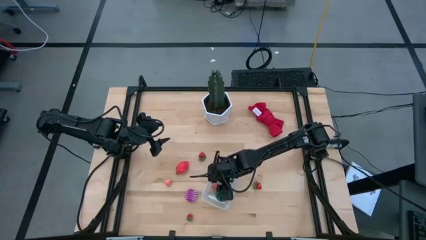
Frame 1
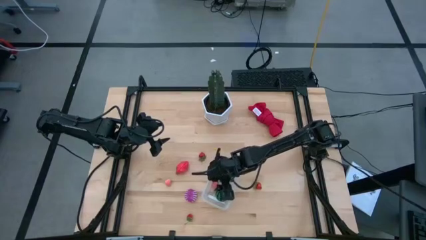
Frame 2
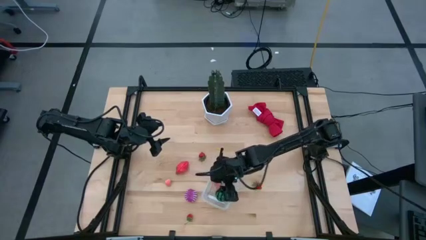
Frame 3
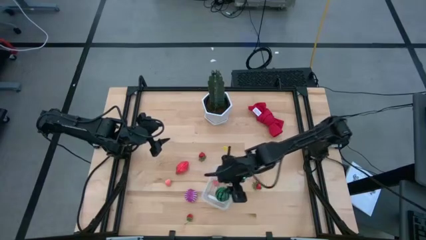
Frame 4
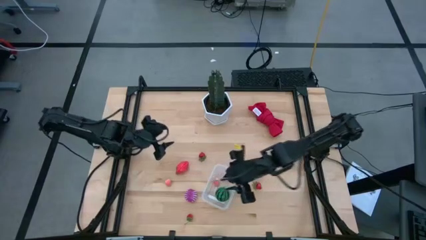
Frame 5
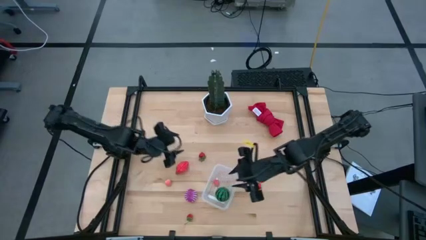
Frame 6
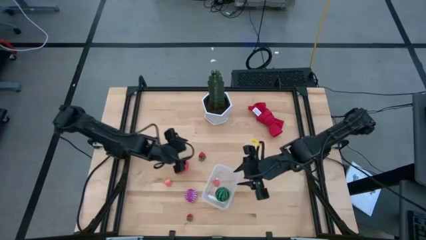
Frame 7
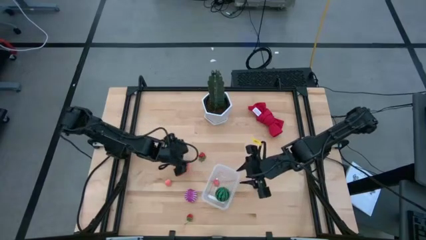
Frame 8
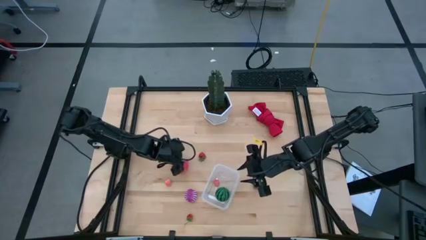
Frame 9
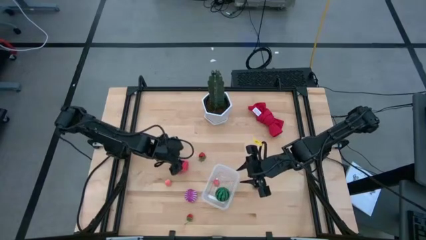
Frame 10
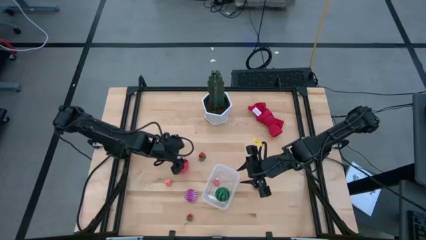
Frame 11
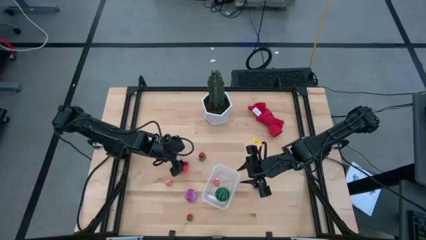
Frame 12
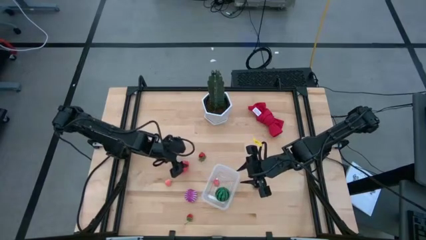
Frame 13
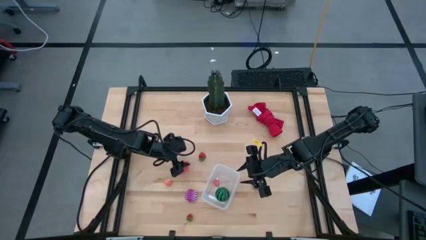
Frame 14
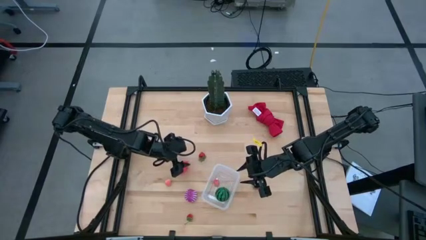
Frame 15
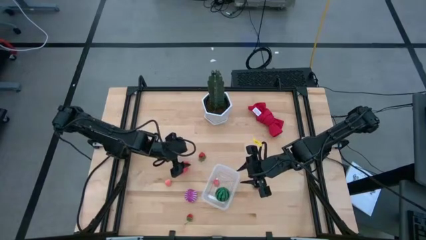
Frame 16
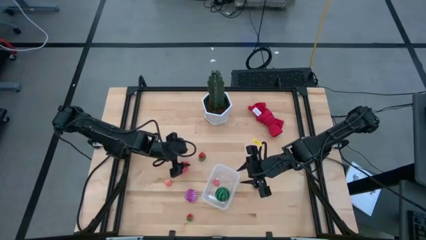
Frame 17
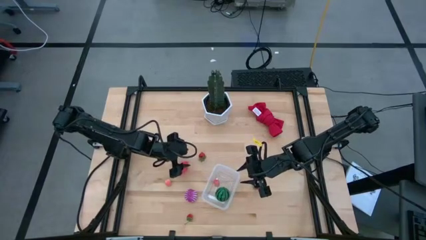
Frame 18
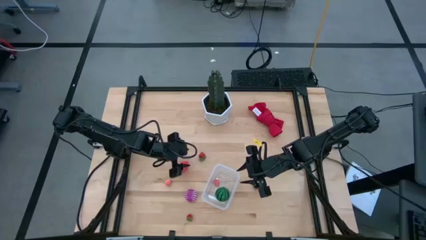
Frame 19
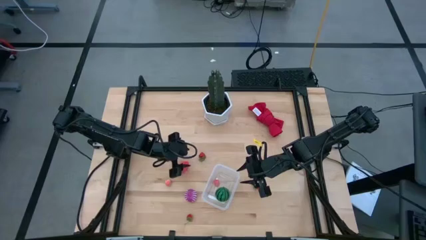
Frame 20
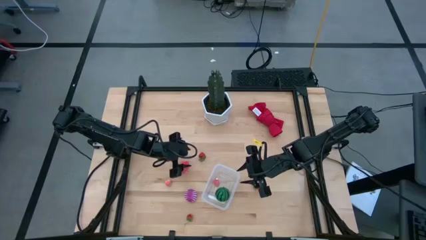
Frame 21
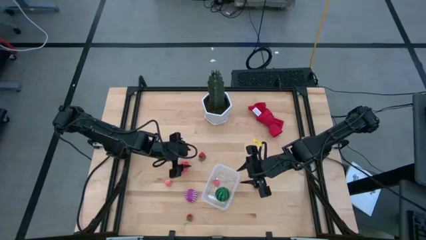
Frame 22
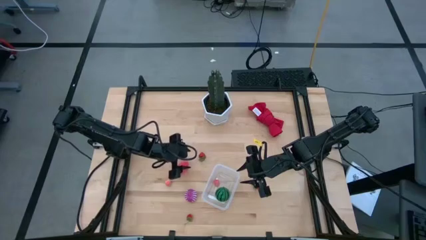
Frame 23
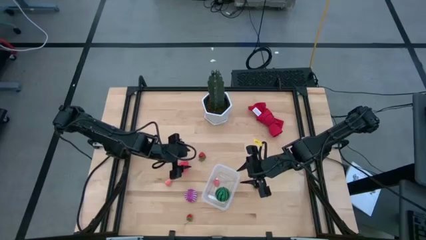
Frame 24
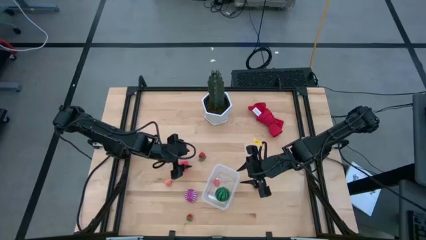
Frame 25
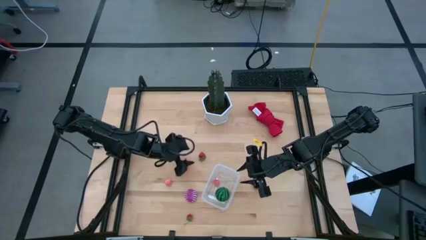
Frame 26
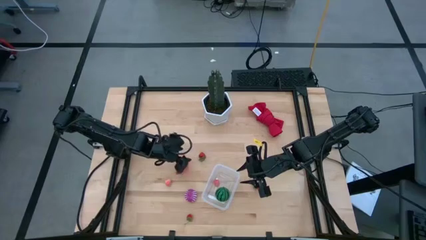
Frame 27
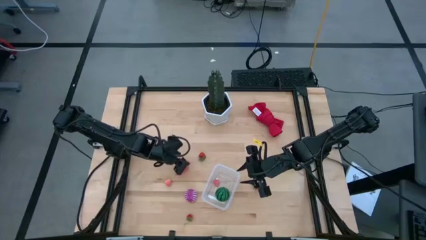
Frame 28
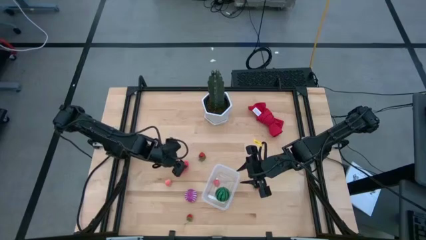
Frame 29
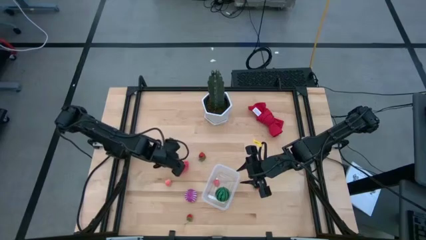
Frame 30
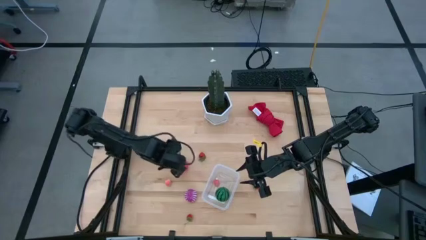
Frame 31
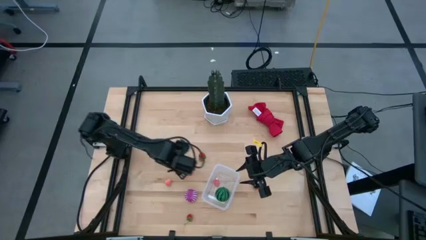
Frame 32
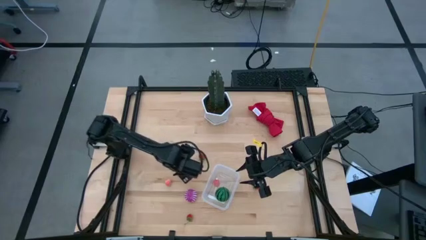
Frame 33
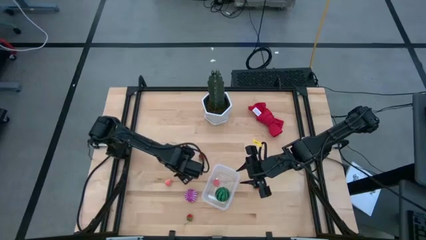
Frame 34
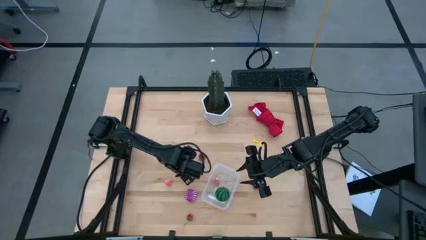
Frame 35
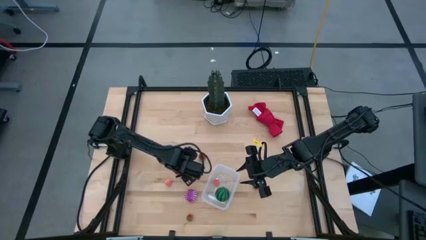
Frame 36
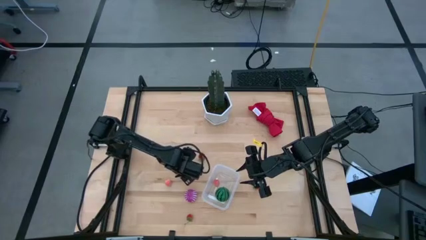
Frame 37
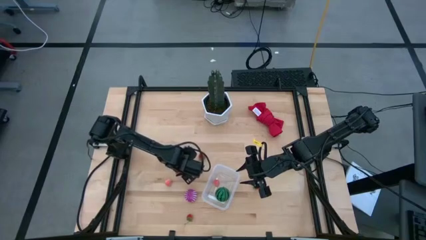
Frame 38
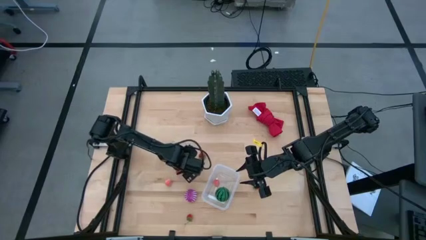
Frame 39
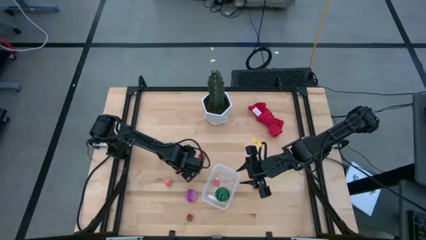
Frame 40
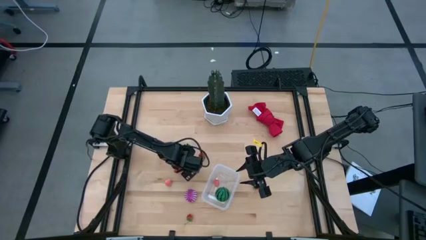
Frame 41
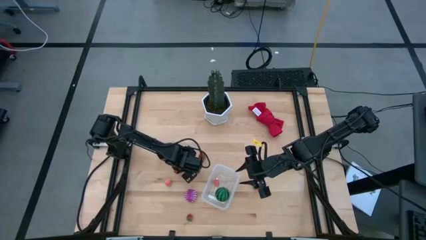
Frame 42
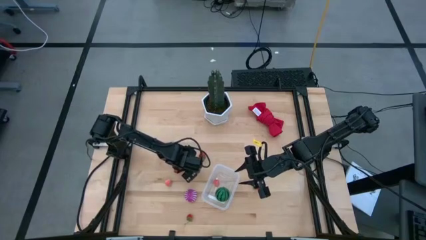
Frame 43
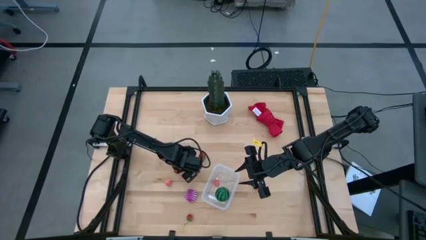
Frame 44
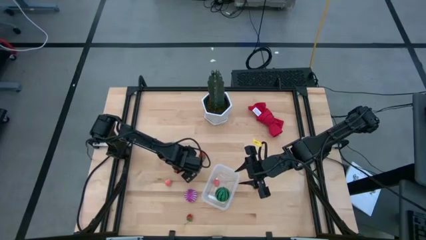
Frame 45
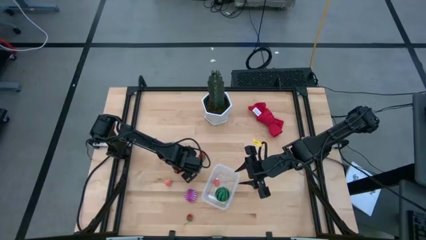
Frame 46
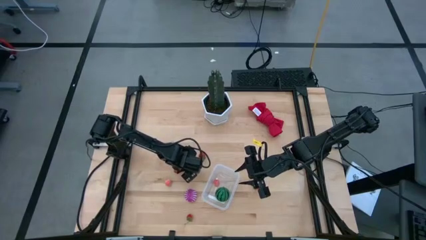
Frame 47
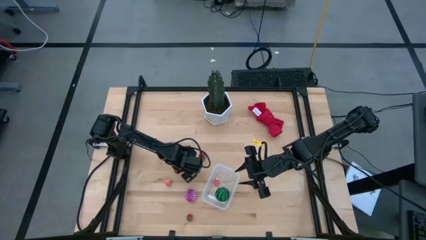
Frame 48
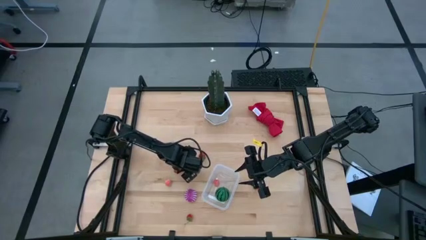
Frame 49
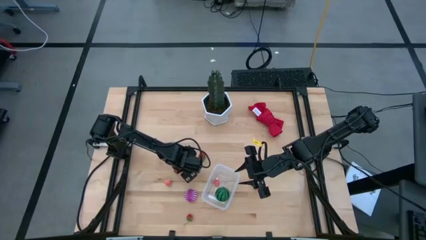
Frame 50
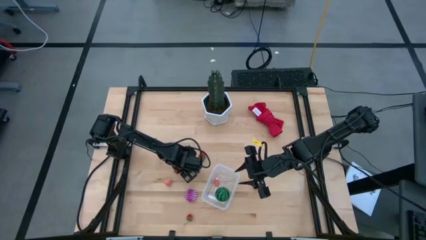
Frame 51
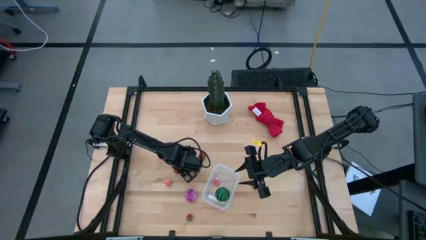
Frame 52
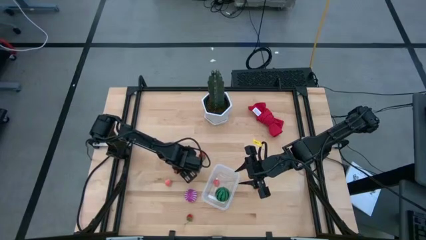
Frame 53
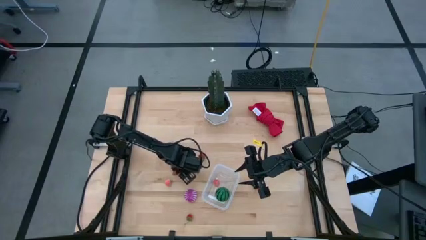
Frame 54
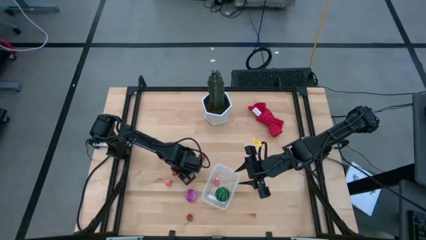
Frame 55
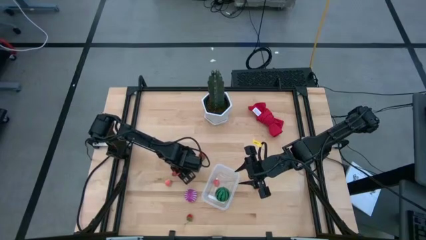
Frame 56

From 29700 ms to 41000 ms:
Task: Pick and placing Produce into tupperware
Put the red dragon fruit into the transparent bin
